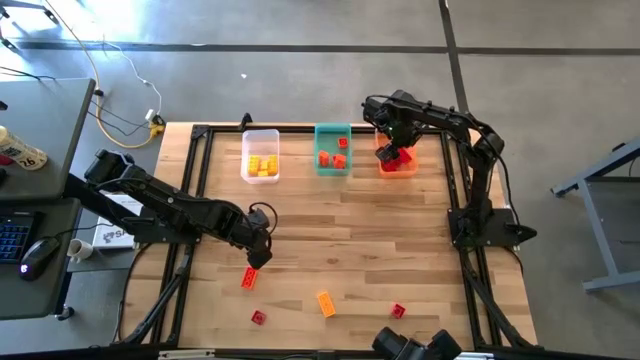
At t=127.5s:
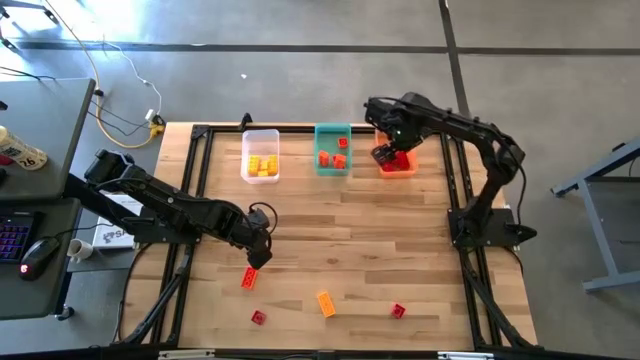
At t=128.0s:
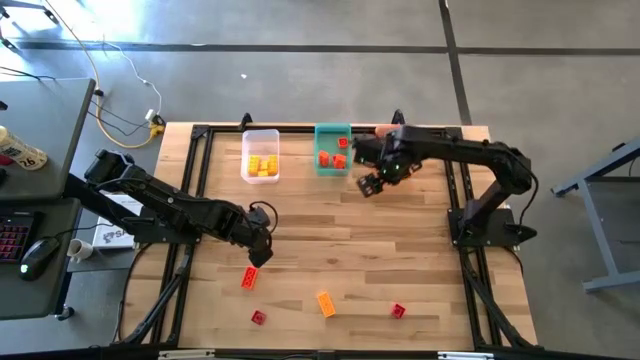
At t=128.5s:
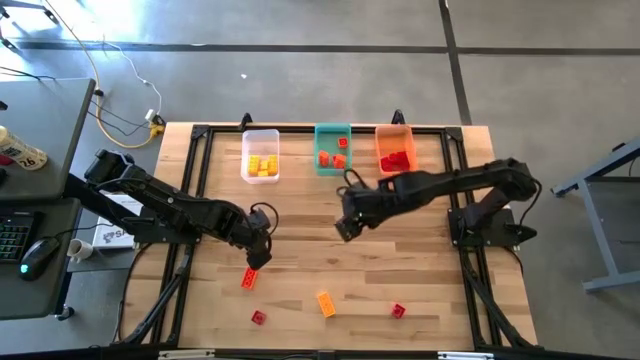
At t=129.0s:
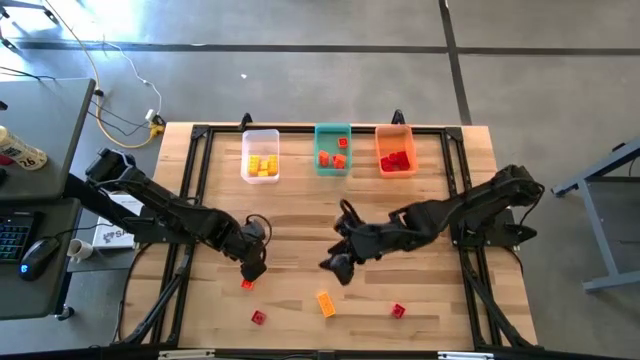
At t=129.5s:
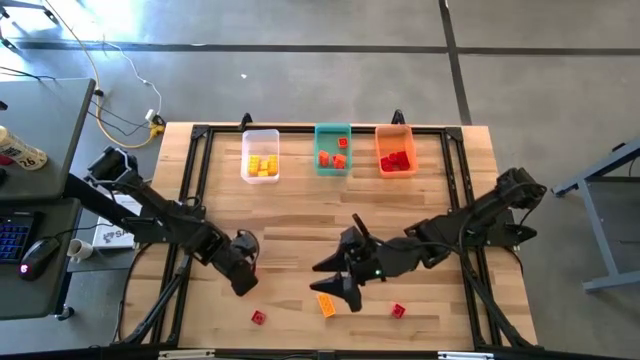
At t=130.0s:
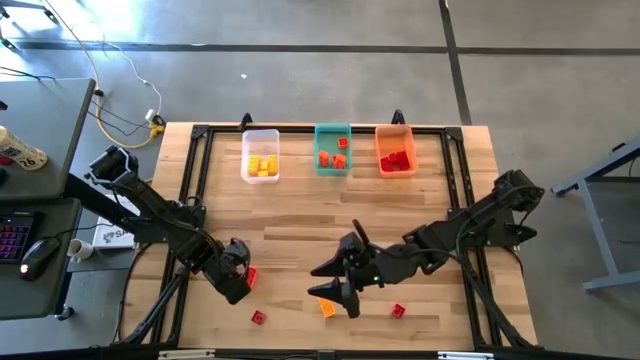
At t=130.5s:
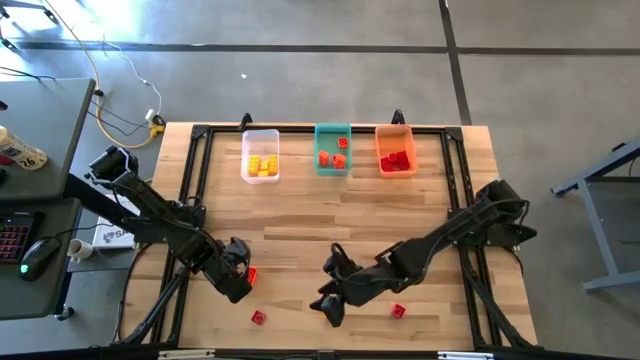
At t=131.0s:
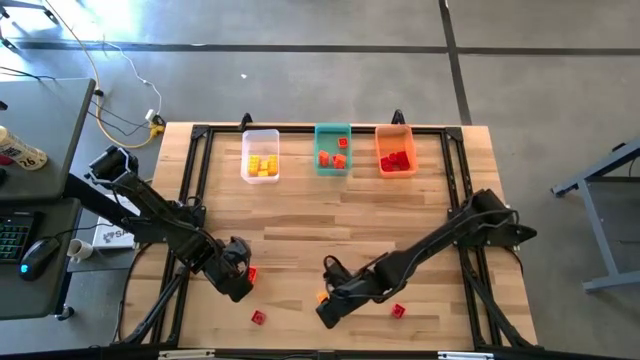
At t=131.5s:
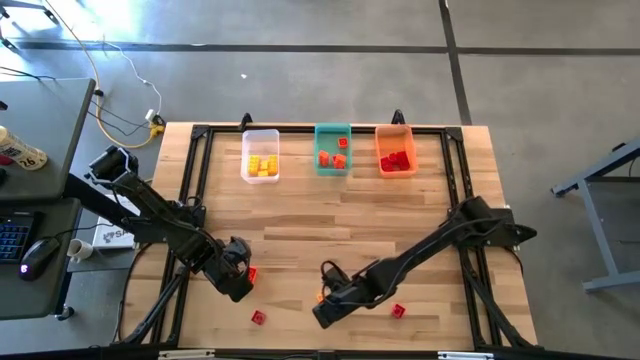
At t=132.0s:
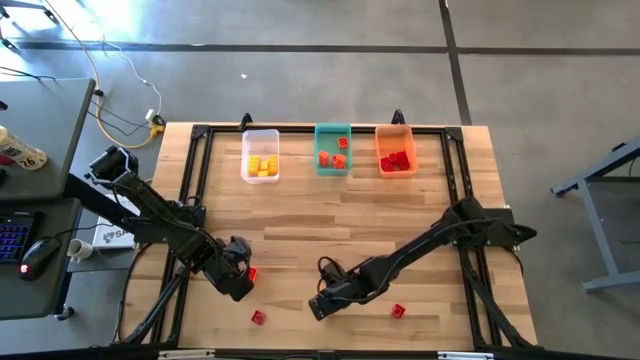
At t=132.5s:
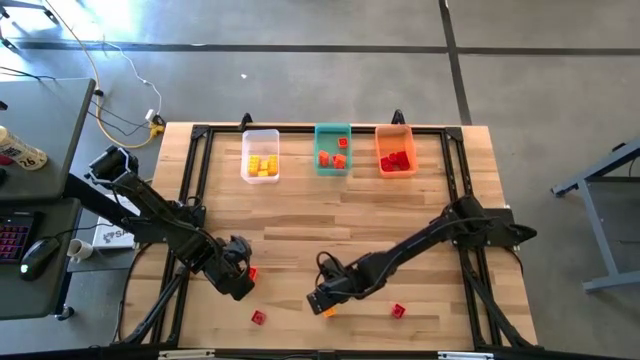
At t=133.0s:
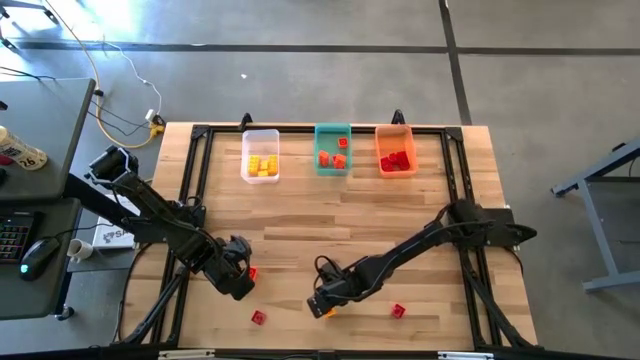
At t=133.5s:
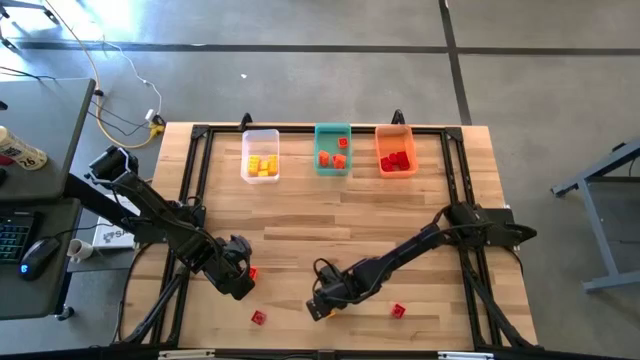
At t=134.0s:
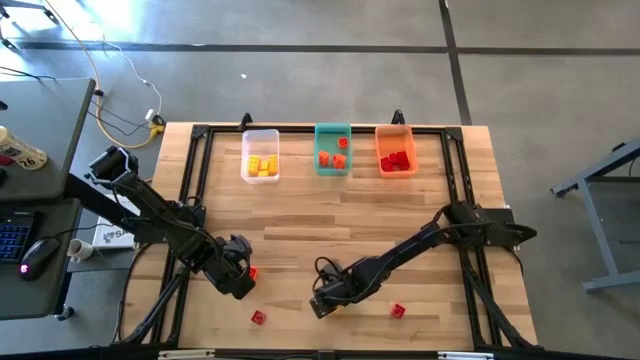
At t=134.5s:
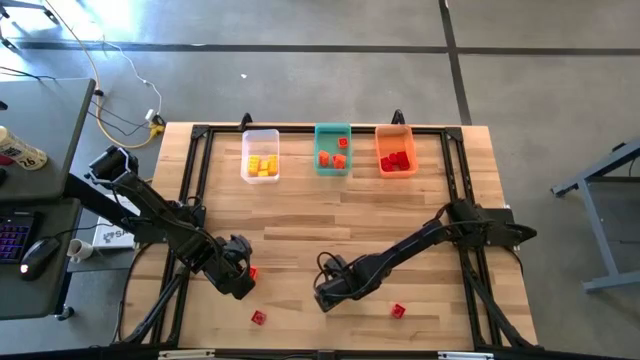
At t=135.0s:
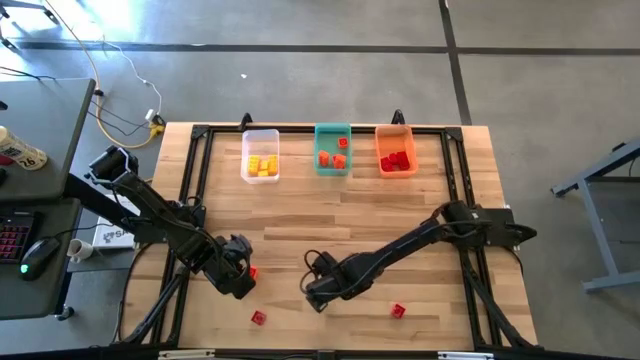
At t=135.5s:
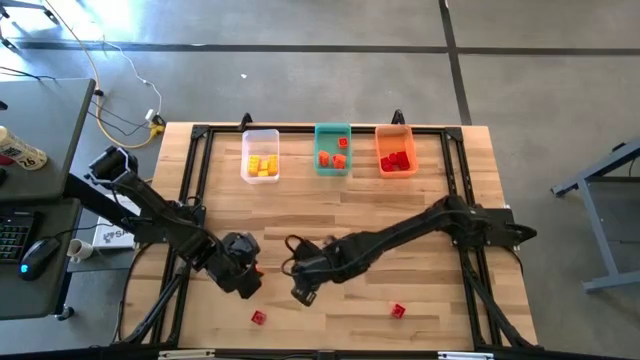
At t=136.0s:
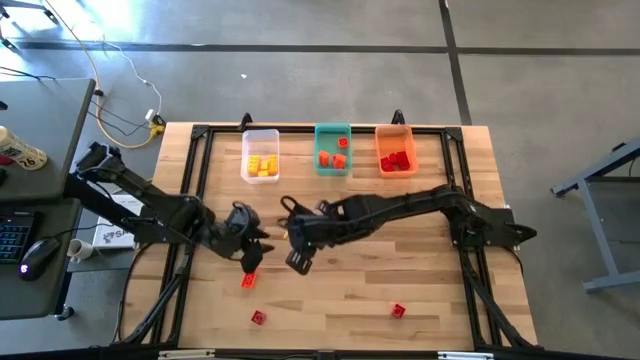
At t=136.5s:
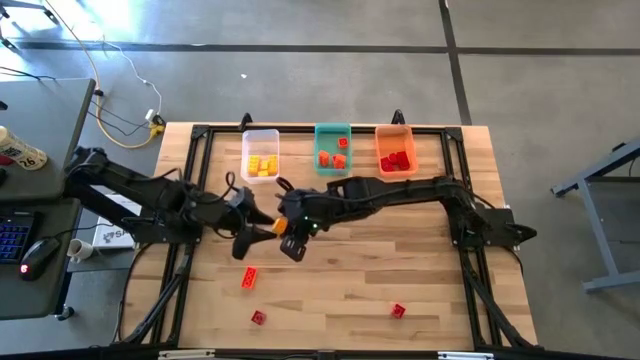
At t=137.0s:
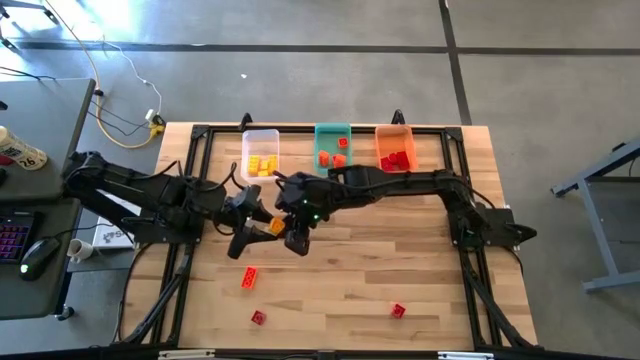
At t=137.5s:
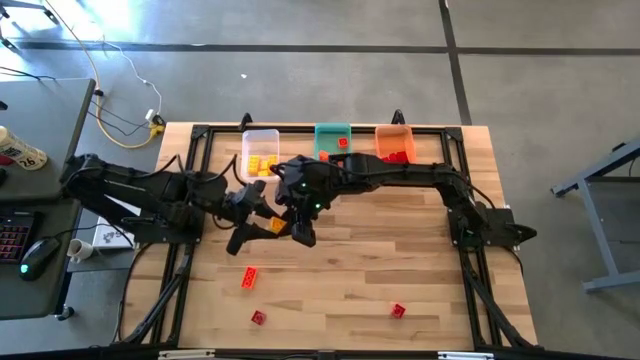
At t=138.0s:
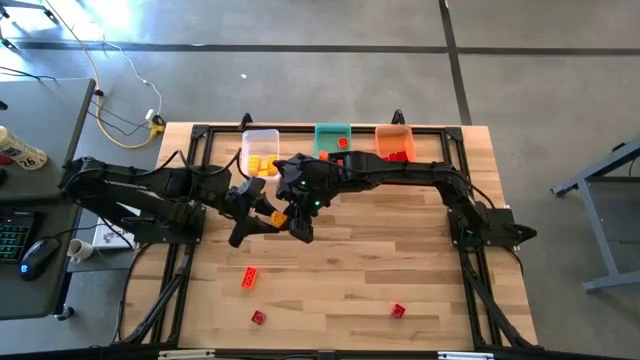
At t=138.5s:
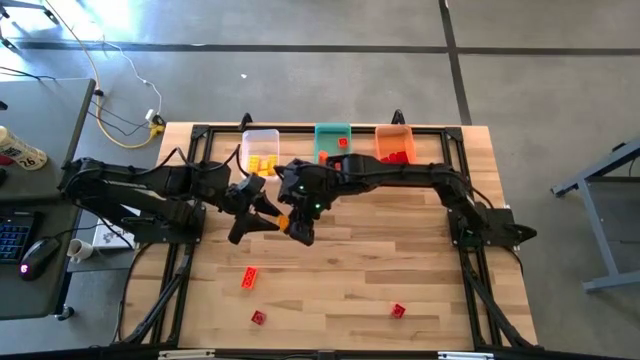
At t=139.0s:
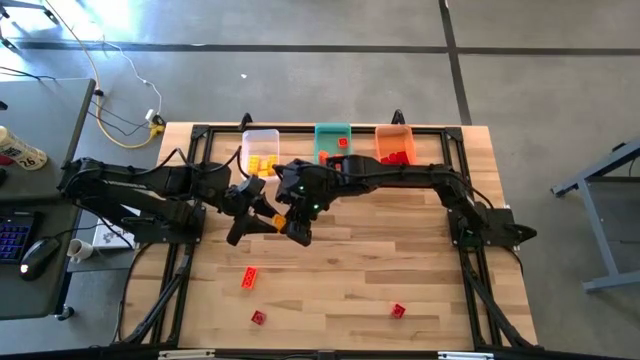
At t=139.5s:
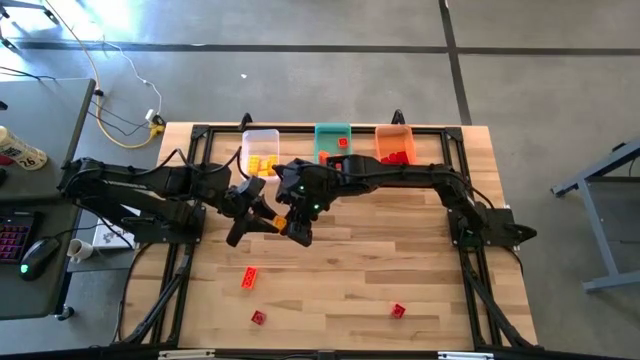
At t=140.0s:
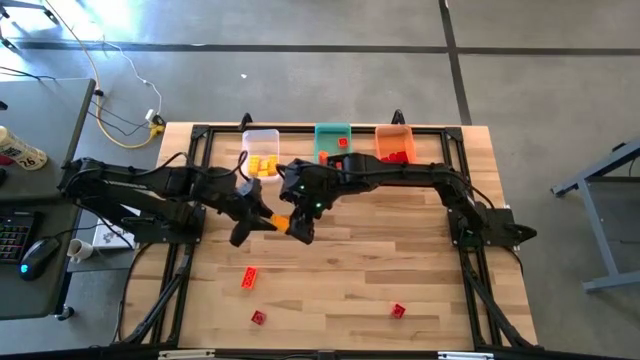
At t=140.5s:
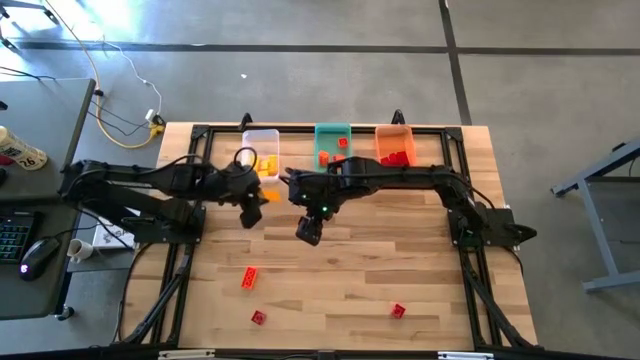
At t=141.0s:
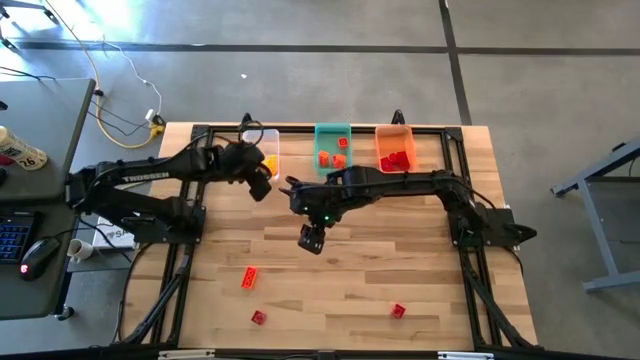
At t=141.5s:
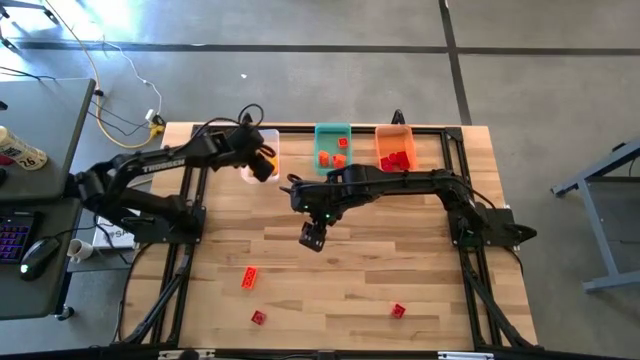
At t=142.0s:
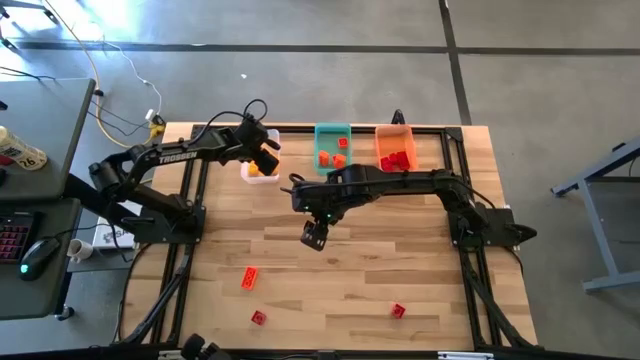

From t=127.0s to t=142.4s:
Task: Sort & place blocks by color
Put the yellow game piece into the transparent bin

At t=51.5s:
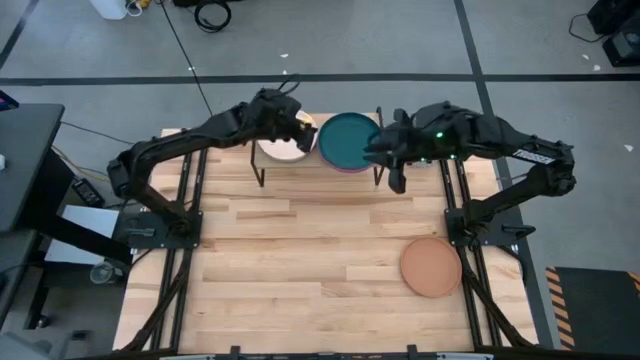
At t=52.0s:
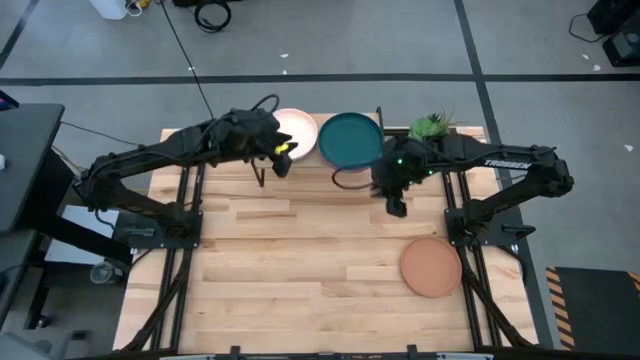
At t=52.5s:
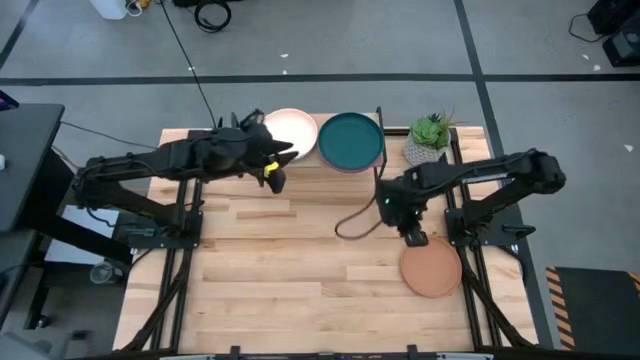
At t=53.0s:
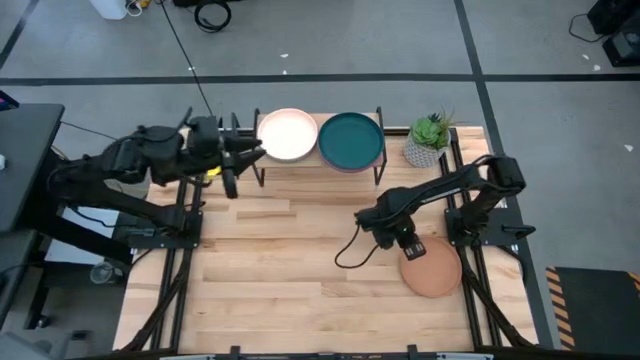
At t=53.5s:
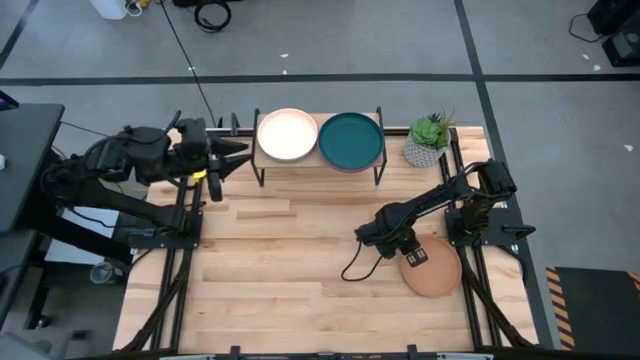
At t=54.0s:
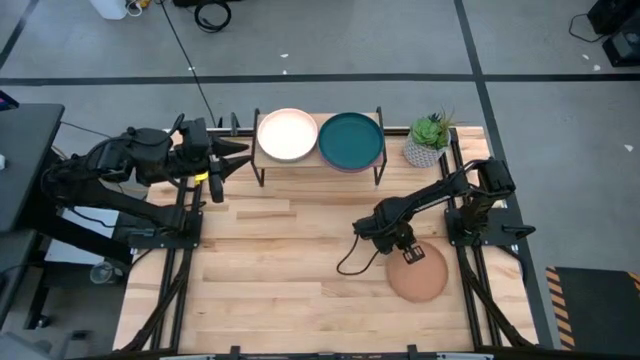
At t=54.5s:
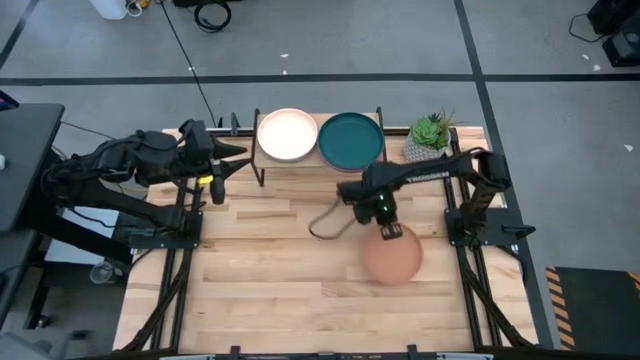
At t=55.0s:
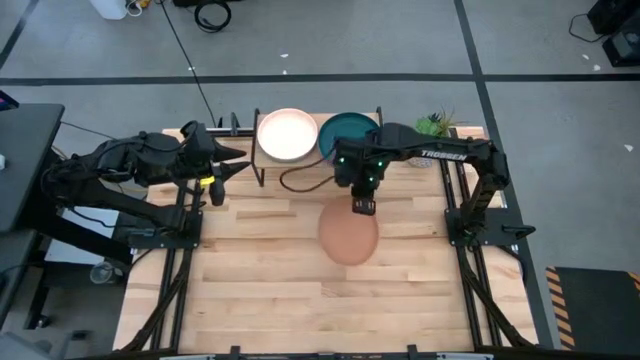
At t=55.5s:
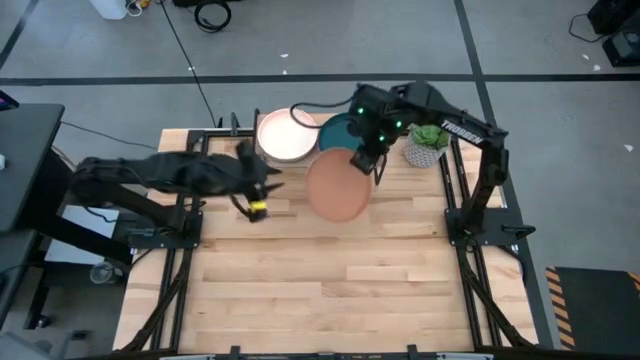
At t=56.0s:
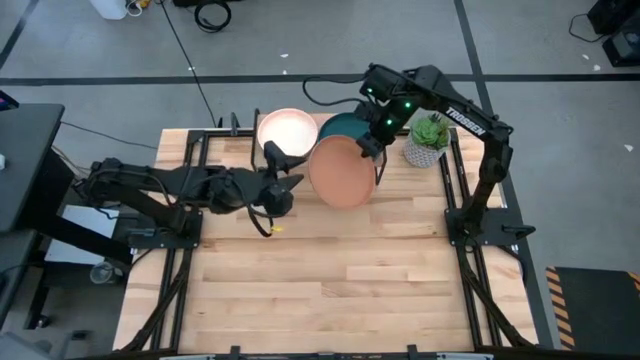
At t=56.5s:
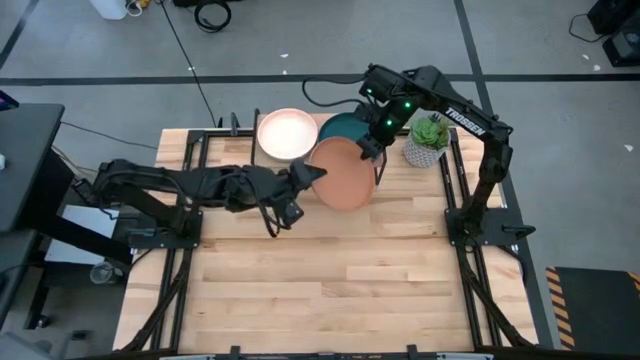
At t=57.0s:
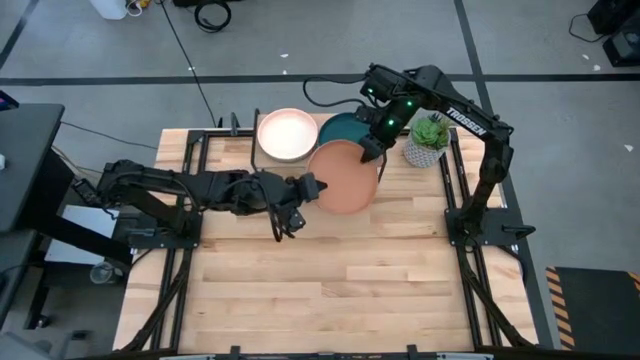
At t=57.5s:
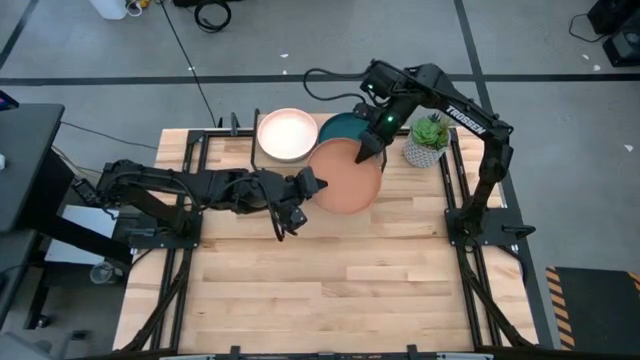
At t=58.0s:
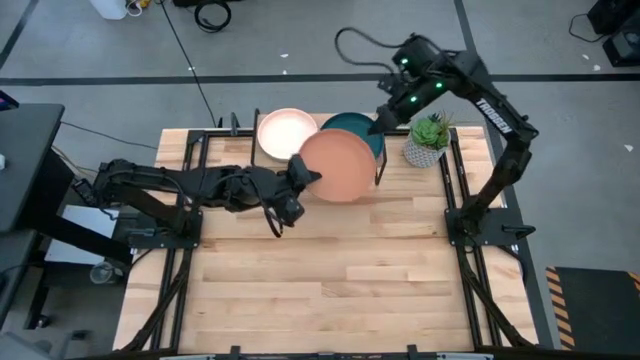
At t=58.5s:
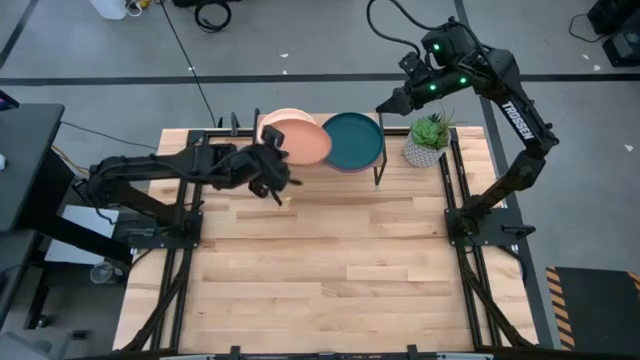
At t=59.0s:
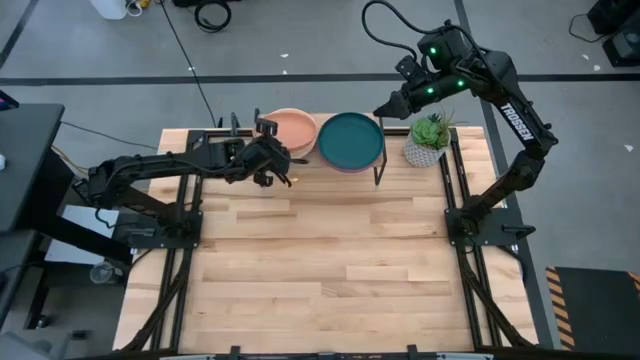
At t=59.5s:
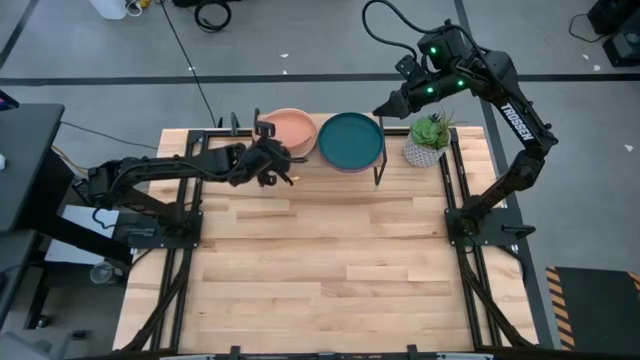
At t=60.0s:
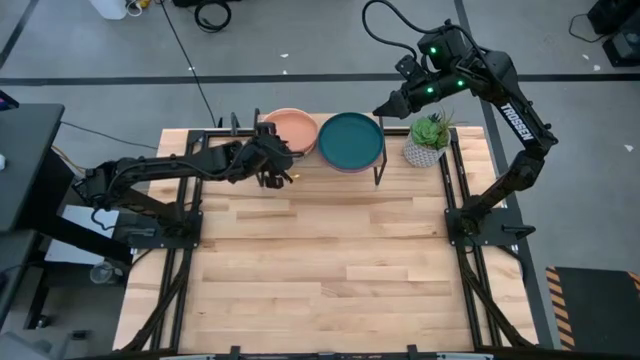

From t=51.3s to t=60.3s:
Task: Place and stack plates onto a shelf
Stack the brown plate on top of the light red plate on the shelf
